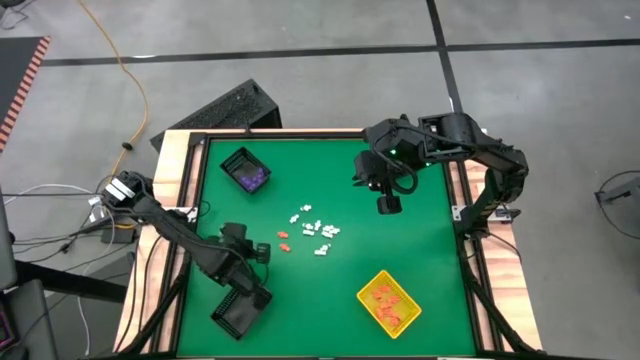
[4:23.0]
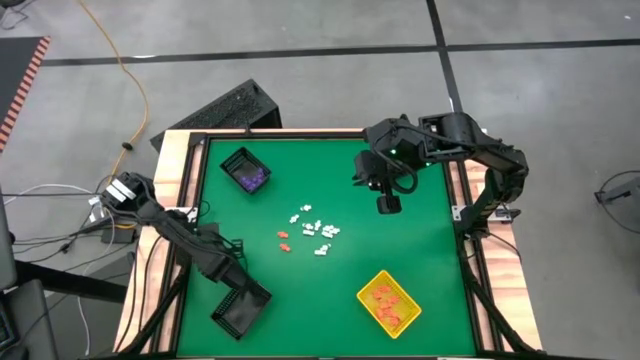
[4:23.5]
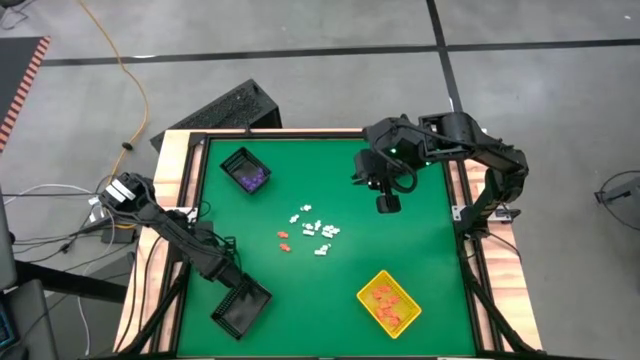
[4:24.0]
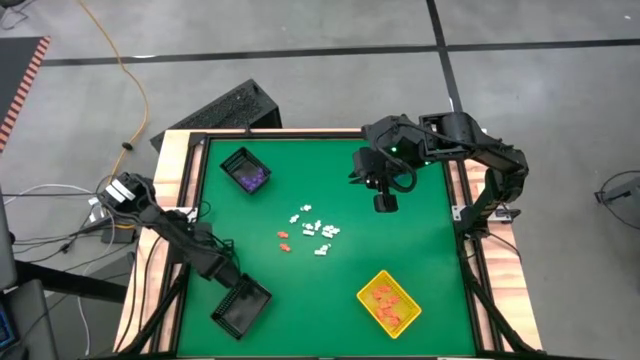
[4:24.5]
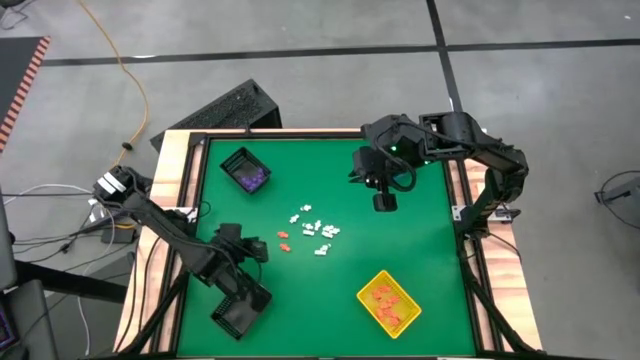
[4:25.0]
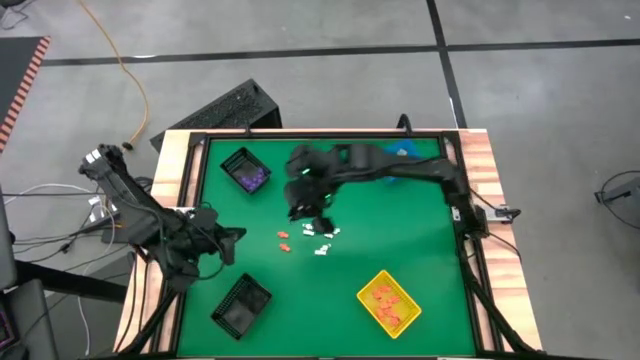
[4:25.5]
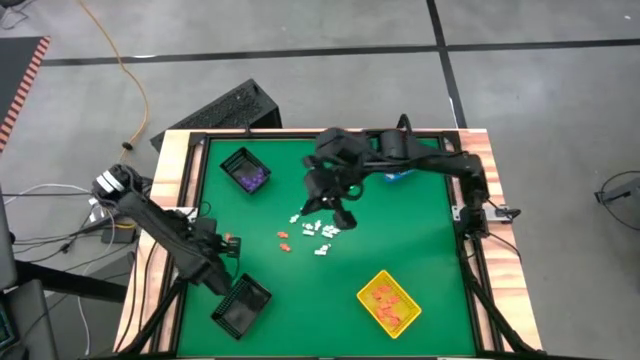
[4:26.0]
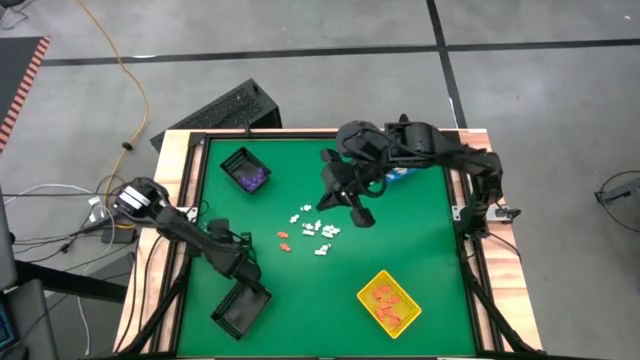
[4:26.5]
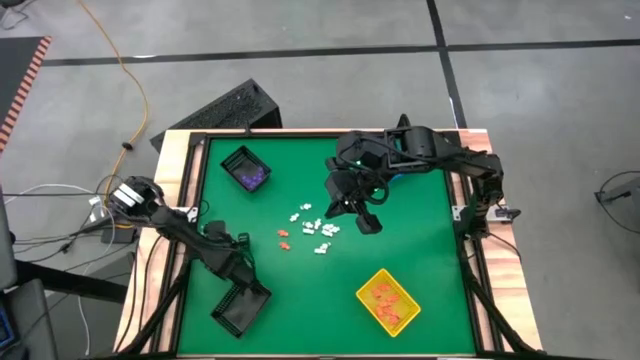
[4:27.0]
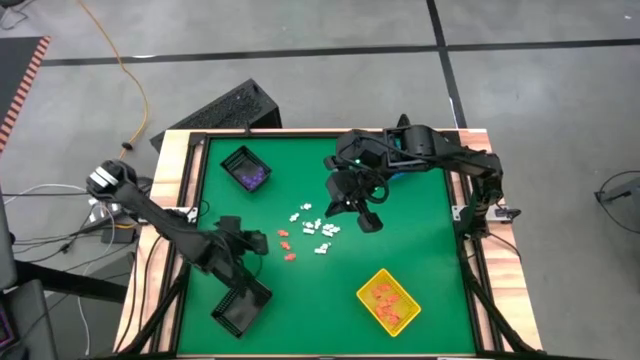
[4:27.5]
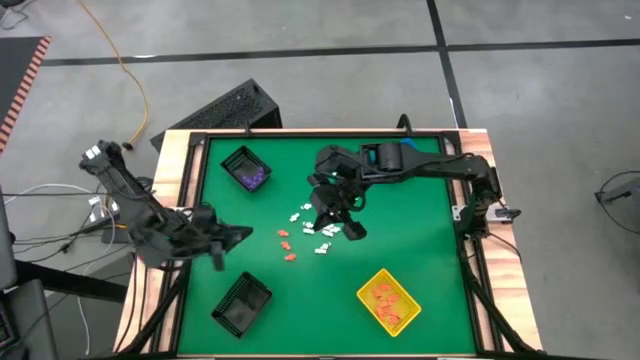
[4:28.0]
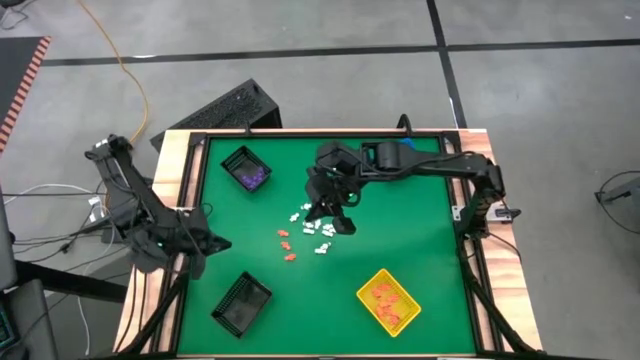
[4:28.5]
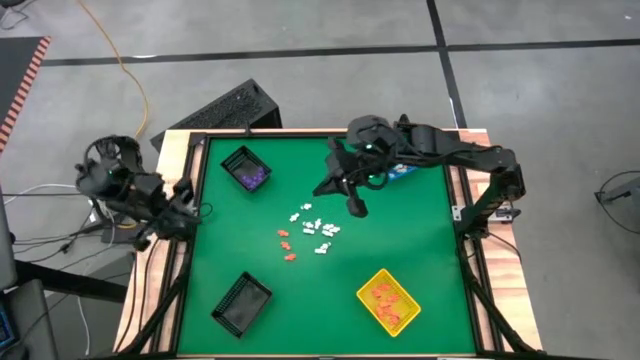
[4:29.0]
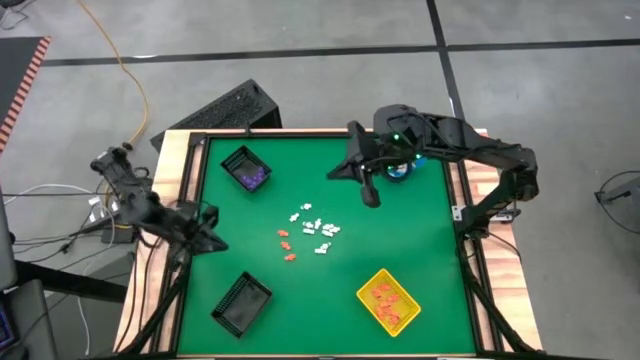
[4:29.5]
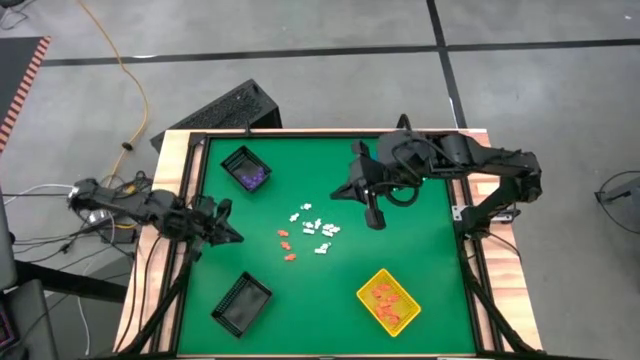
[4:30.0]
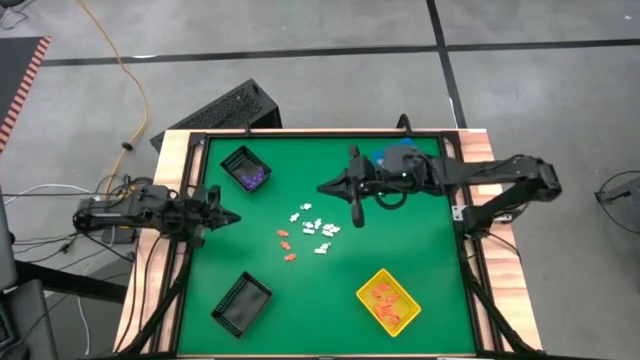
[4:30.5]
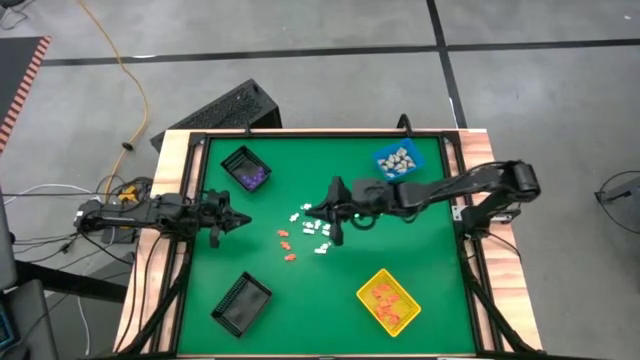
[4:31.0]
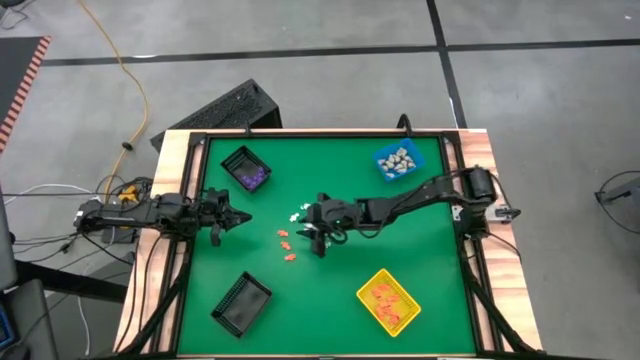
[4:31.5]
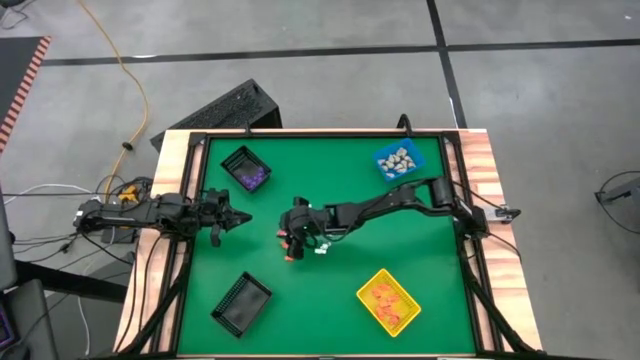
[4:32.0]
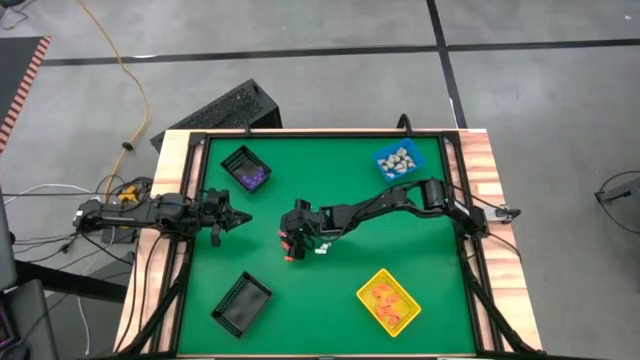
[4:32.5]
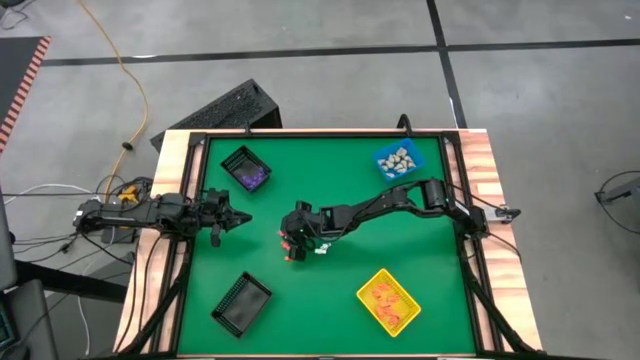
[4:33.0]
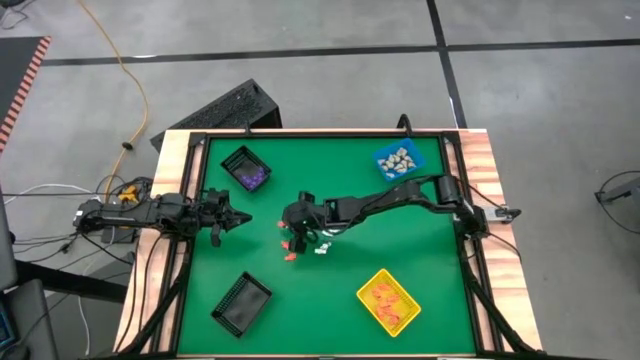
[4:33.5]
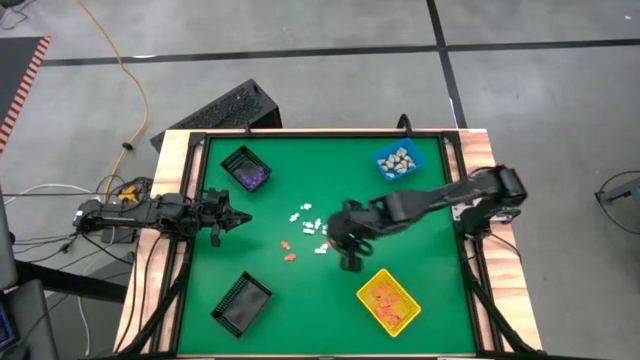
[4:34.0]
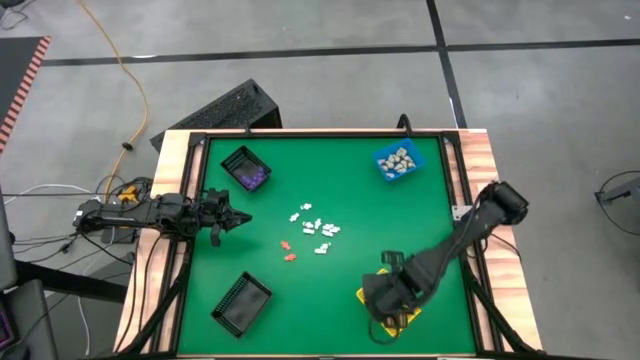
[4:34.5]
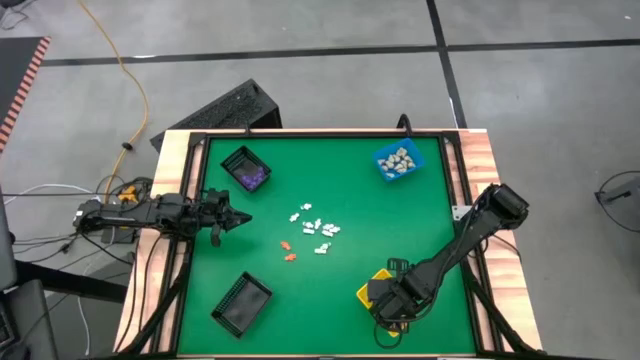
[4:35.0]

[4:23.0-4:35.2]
Task: Sort Halloween decoration
Put the orange skeleton toy into the yellow basket

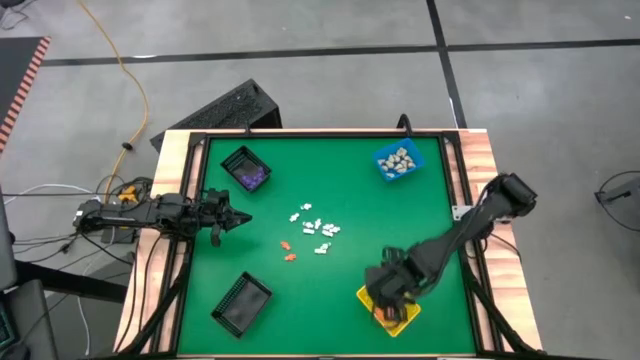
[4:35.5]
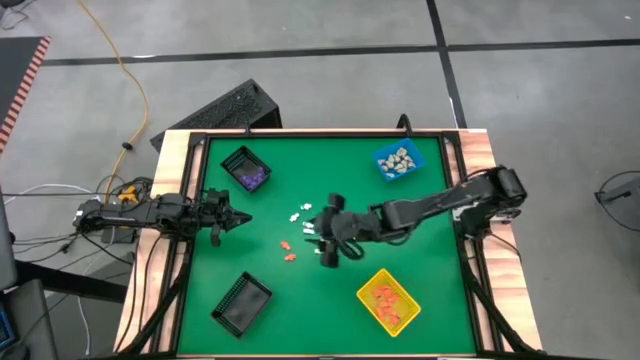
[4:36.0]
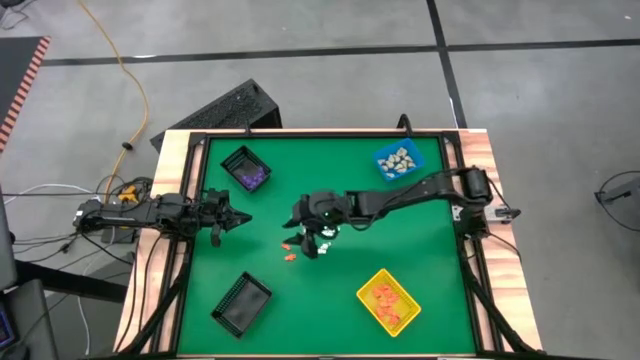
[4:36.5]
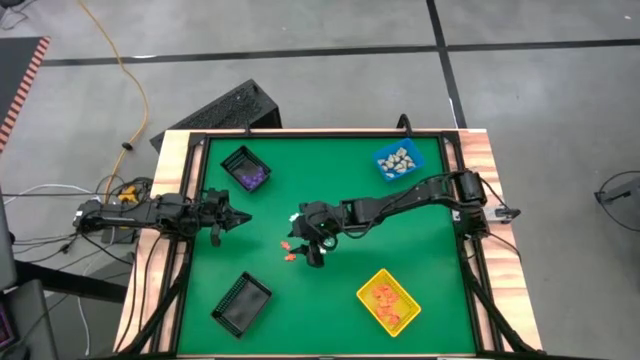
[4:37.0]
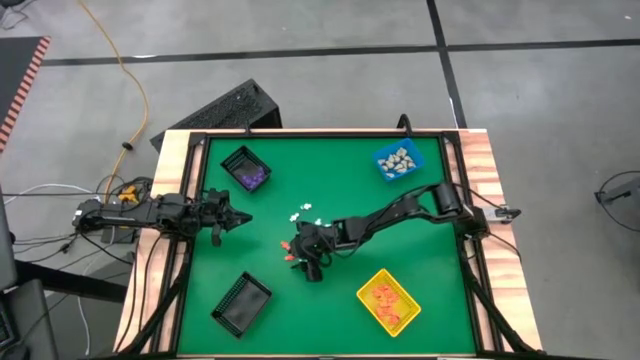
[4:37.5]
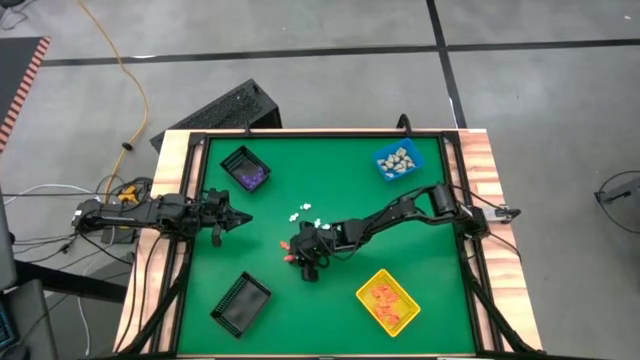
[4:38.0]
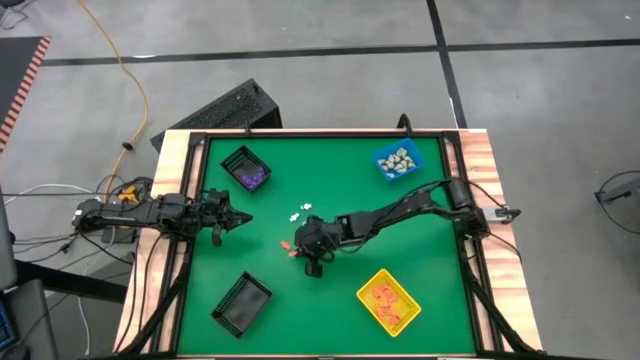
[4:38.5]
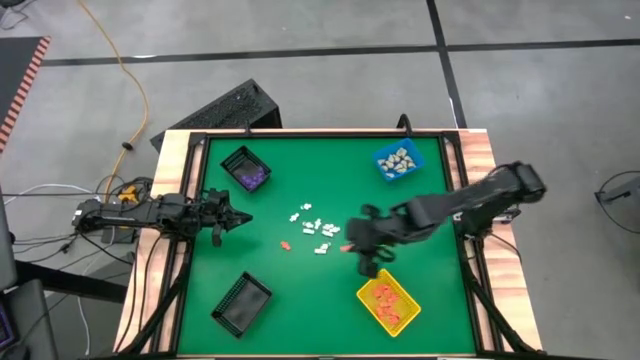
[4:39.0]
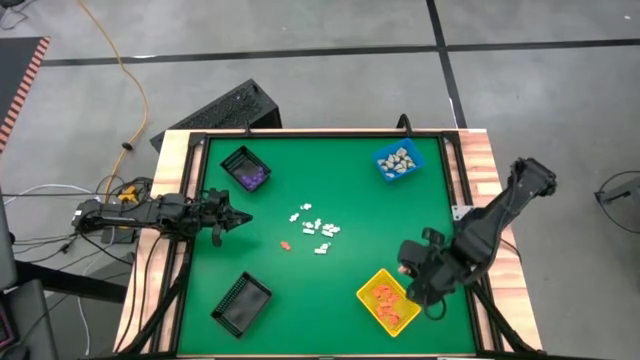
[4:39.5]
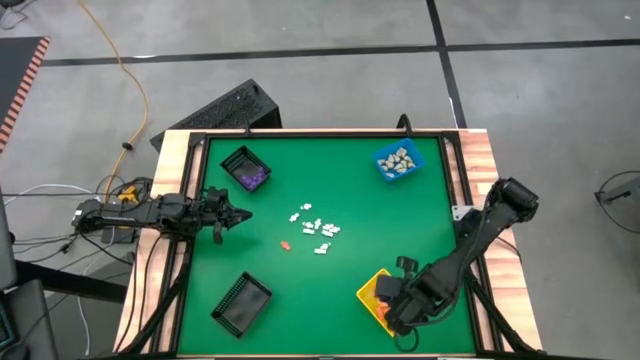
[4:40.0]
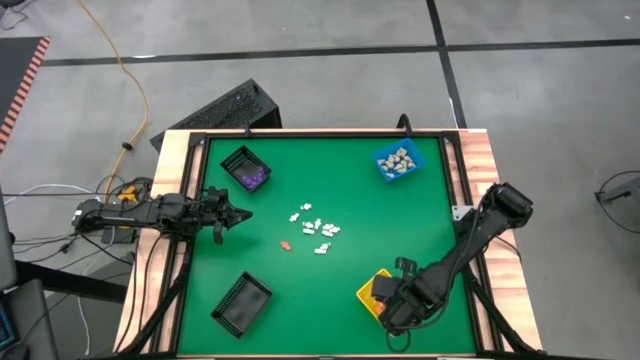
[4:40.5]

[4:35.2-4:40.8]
Put the orange skeleton toy into the yellow basket

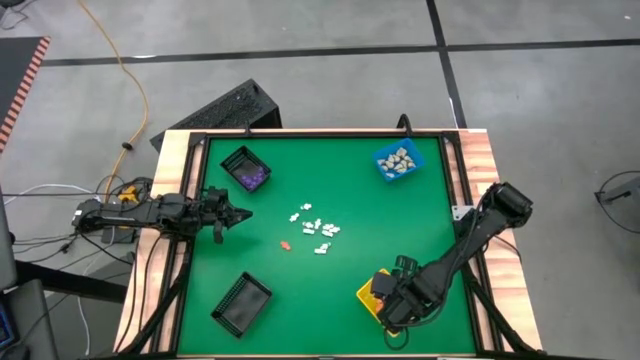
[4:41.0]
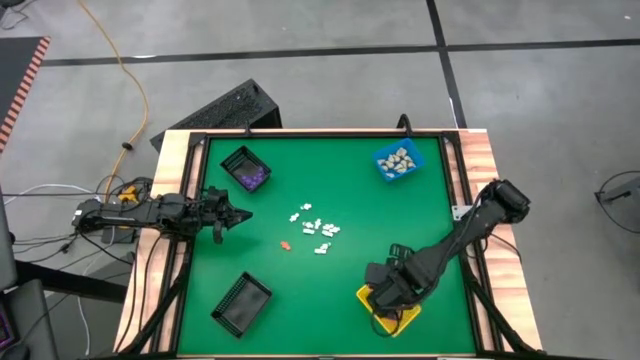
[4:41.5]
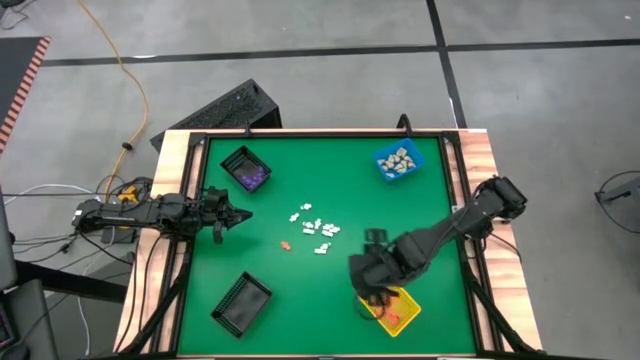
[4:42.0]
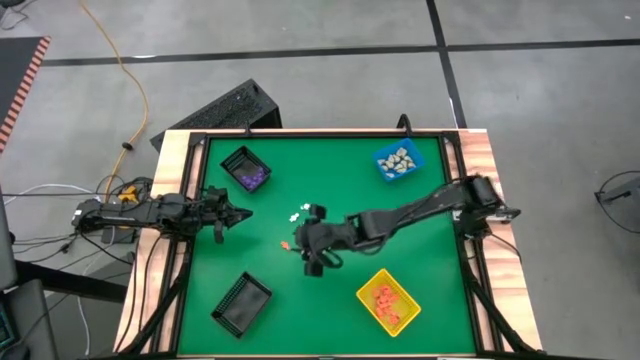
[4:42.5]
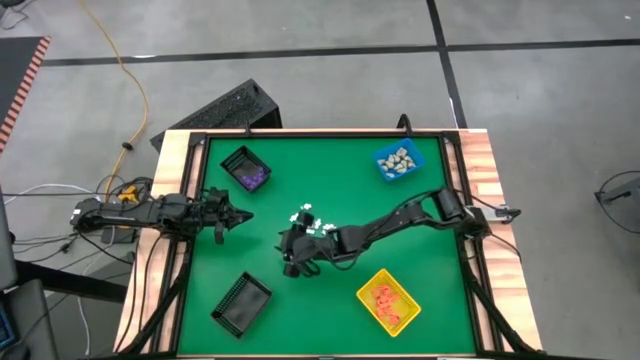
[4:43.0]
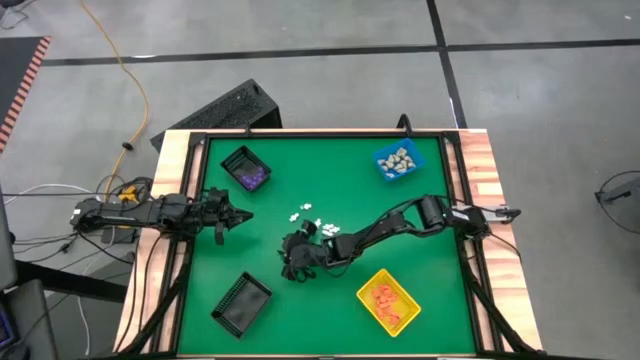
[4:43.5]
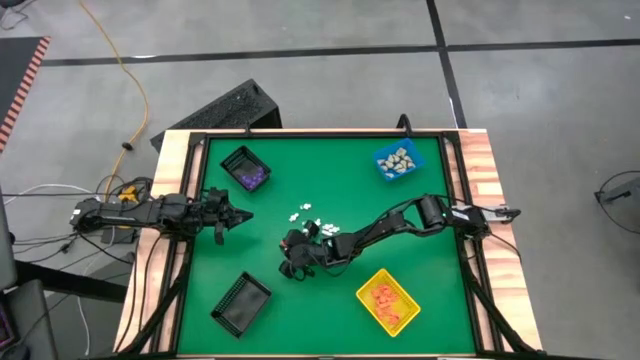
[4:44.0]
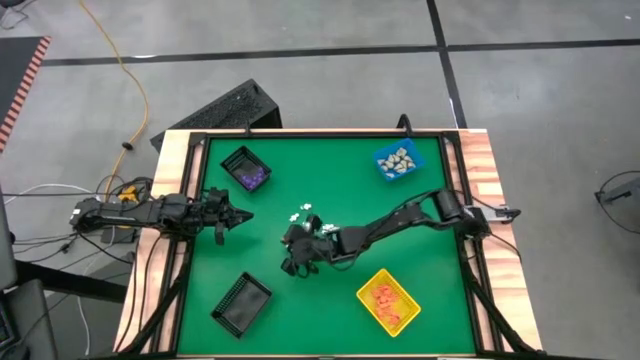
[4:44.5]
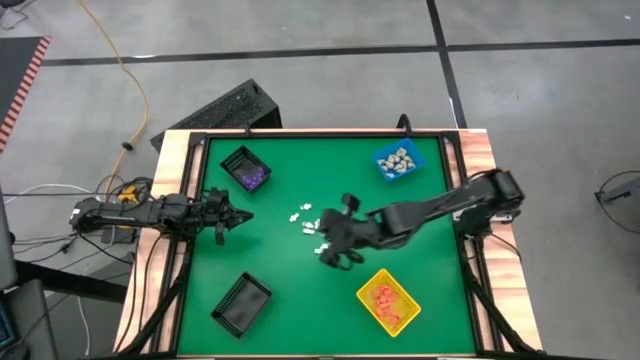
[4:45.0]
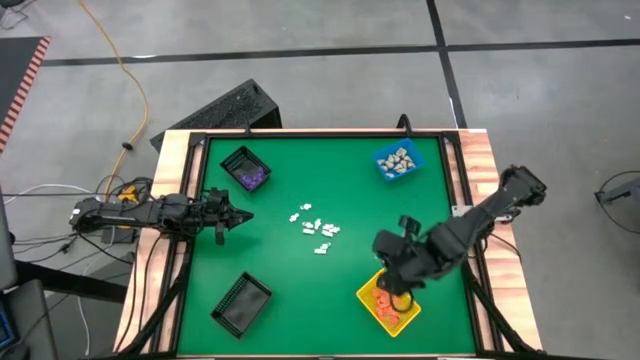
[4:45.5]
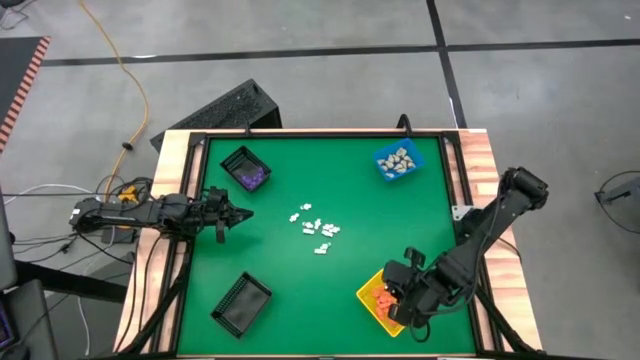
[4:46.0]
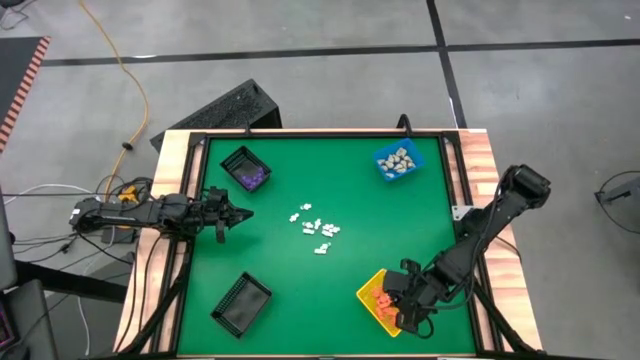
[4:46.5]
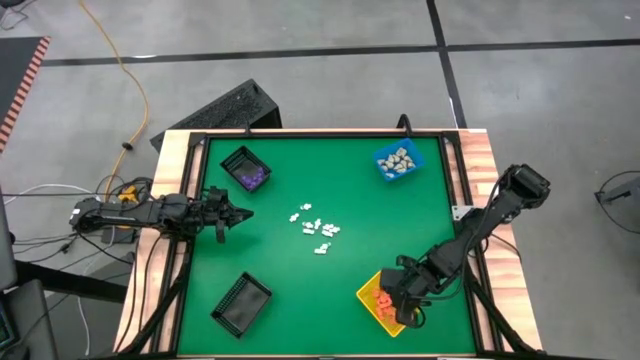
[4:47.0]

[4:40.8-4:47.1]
Put the orange skeleton toy into the yellow basket
